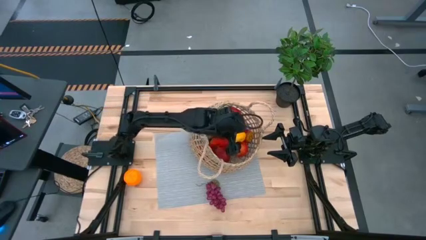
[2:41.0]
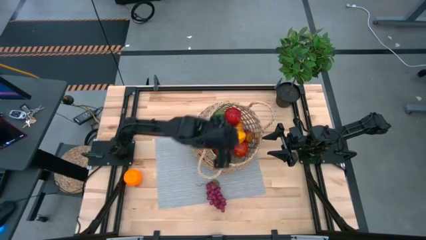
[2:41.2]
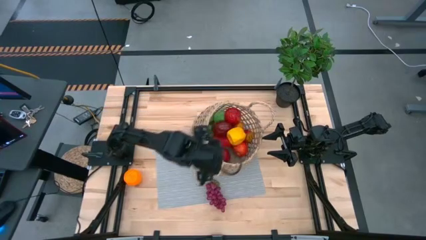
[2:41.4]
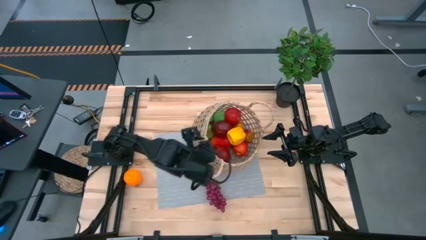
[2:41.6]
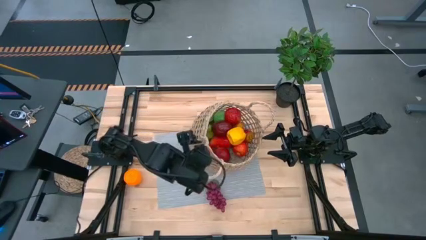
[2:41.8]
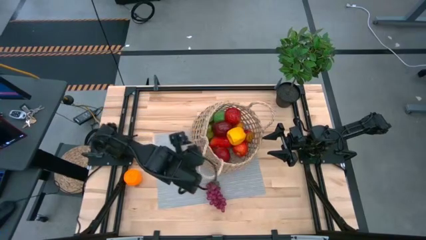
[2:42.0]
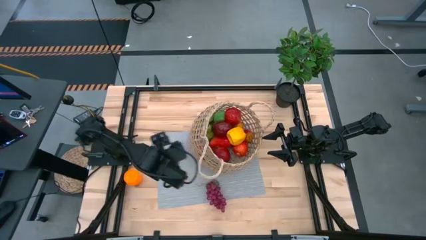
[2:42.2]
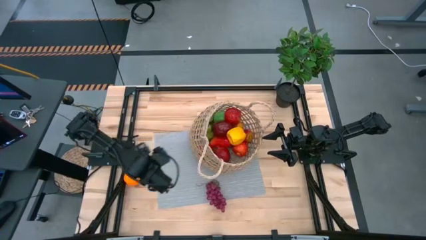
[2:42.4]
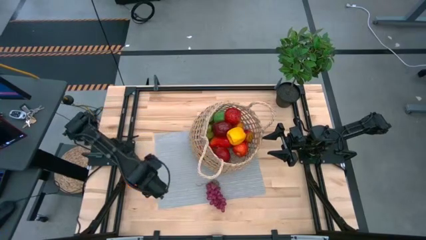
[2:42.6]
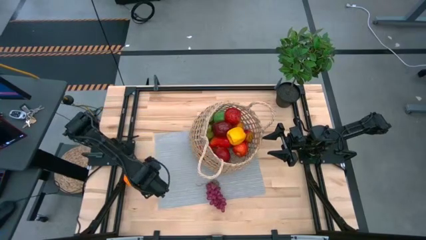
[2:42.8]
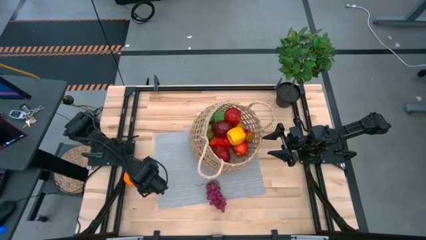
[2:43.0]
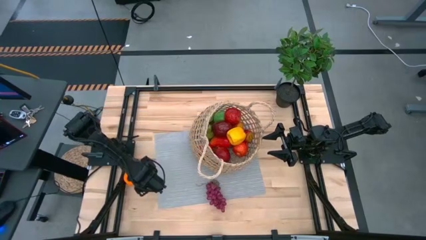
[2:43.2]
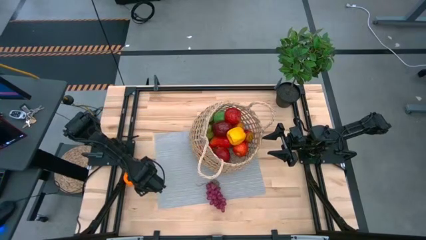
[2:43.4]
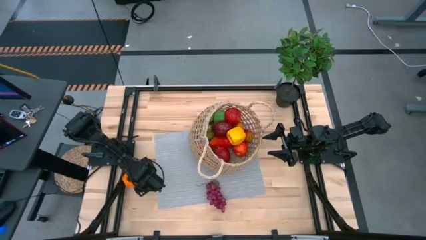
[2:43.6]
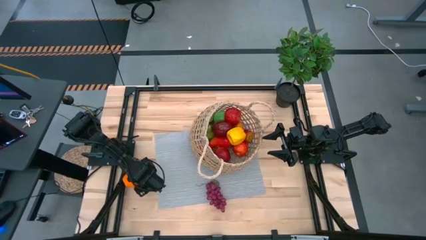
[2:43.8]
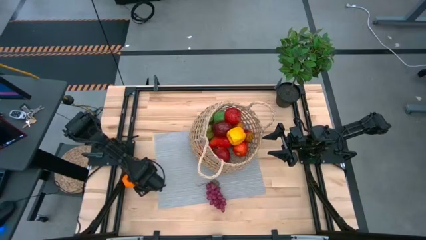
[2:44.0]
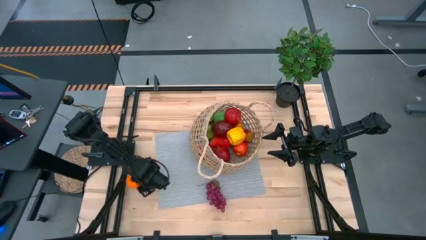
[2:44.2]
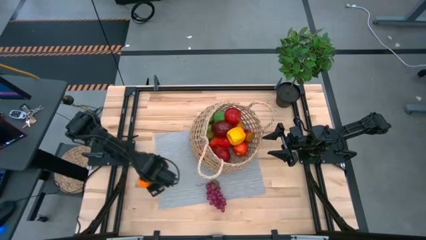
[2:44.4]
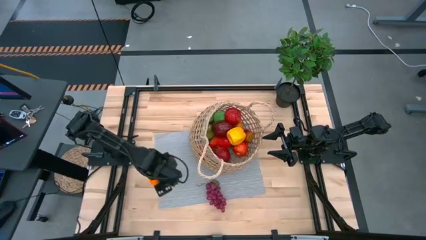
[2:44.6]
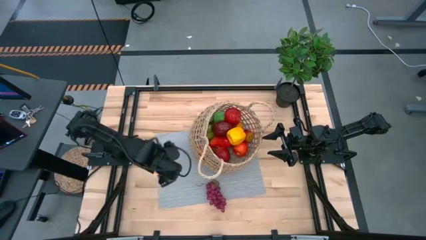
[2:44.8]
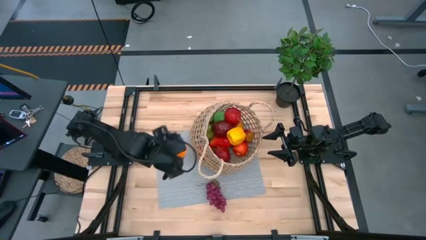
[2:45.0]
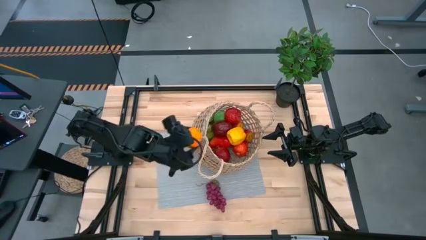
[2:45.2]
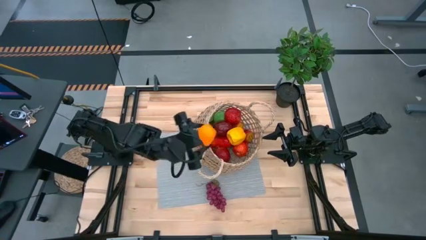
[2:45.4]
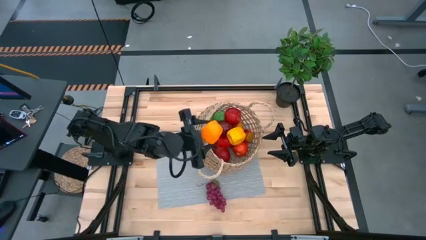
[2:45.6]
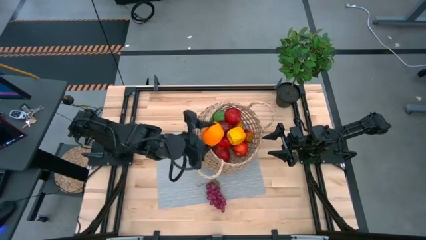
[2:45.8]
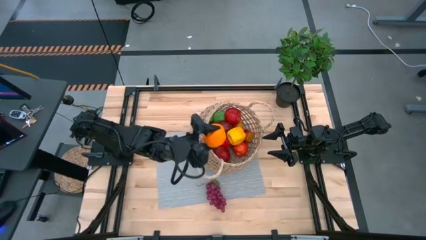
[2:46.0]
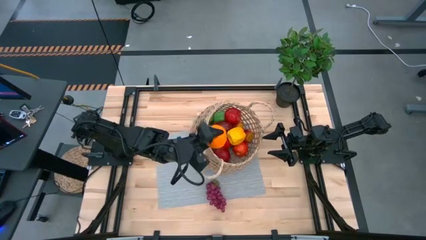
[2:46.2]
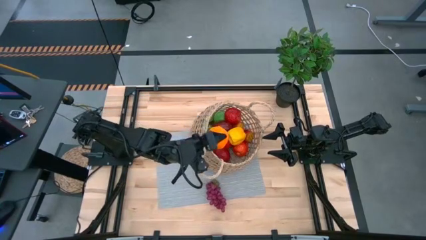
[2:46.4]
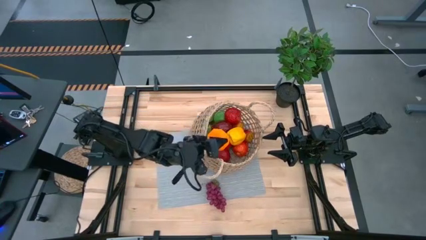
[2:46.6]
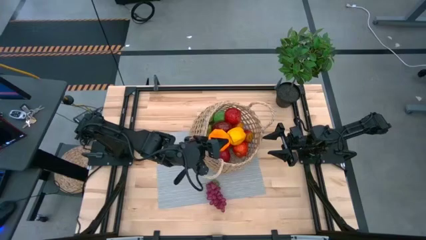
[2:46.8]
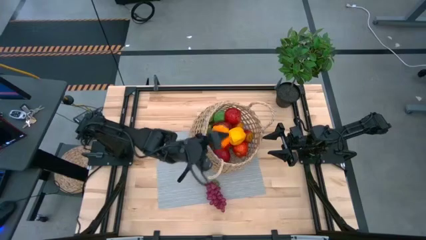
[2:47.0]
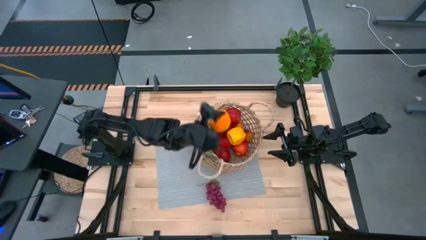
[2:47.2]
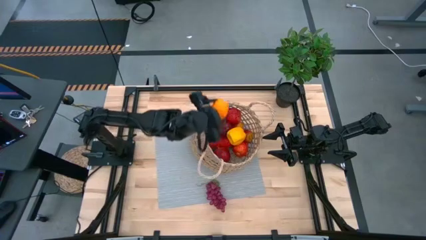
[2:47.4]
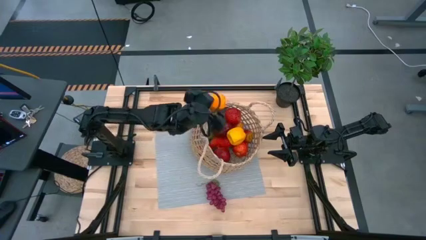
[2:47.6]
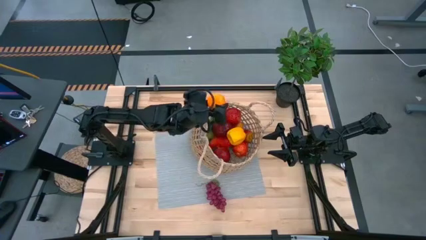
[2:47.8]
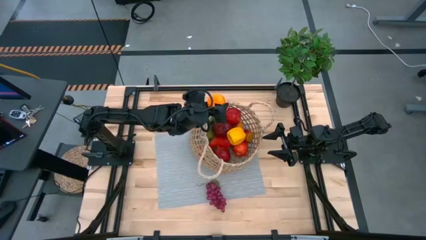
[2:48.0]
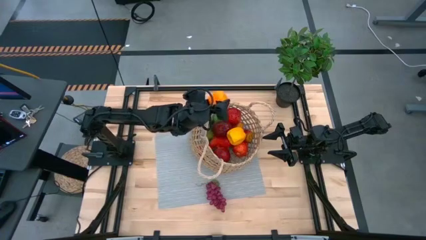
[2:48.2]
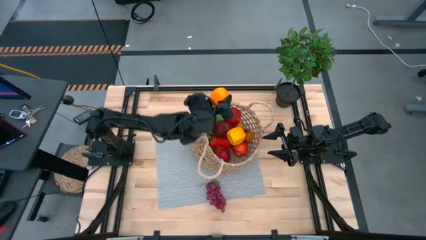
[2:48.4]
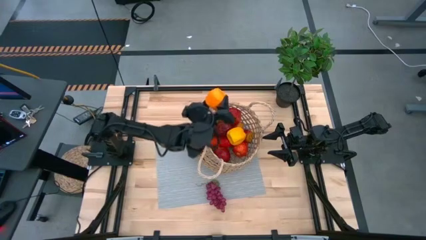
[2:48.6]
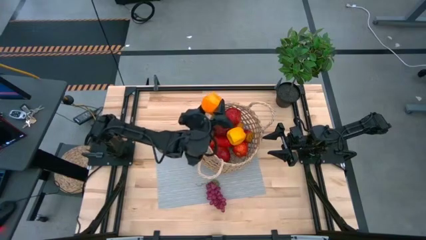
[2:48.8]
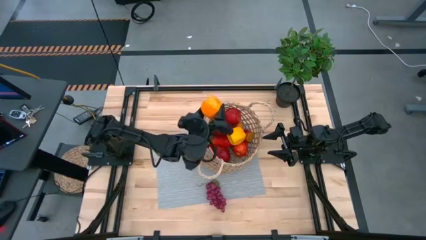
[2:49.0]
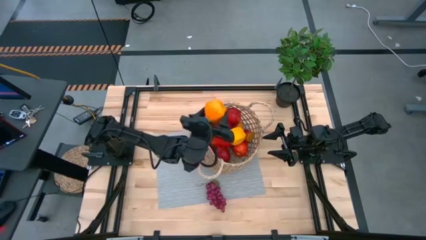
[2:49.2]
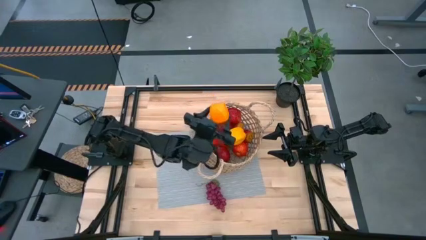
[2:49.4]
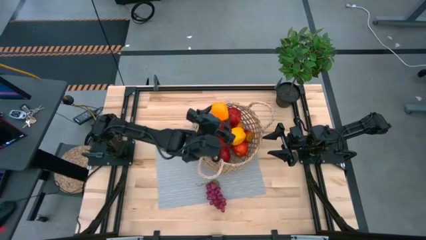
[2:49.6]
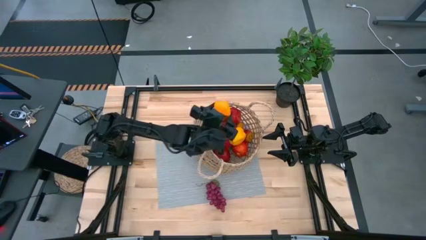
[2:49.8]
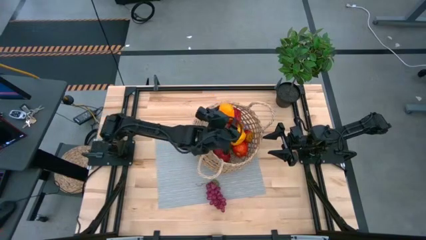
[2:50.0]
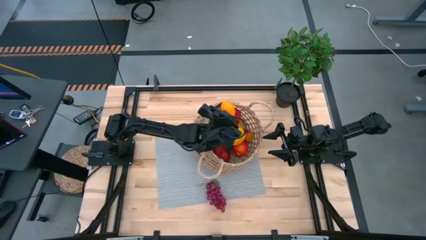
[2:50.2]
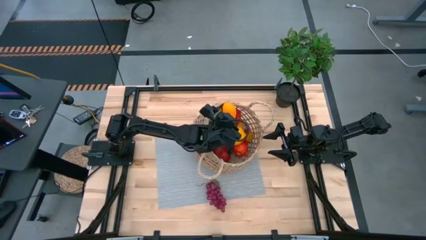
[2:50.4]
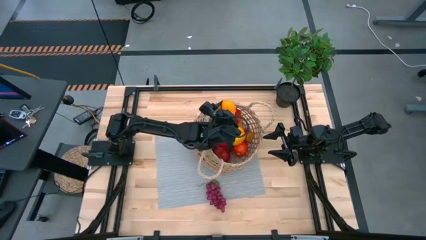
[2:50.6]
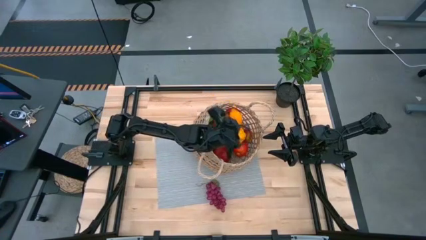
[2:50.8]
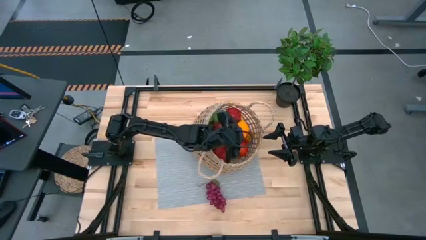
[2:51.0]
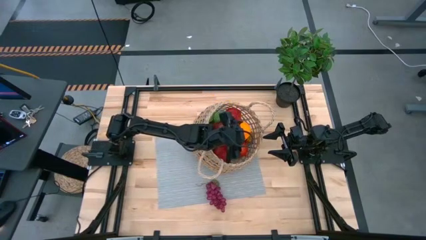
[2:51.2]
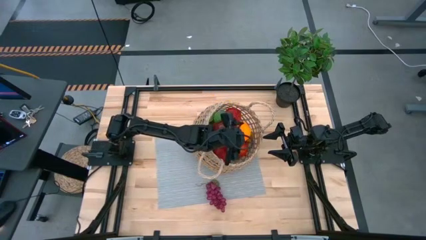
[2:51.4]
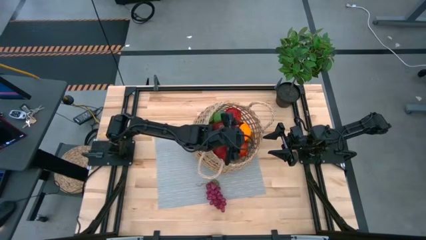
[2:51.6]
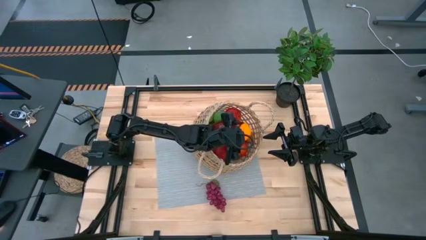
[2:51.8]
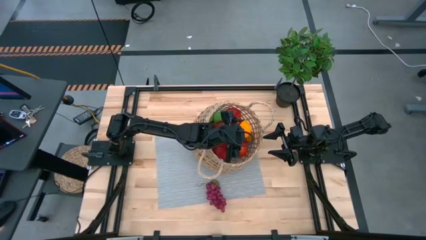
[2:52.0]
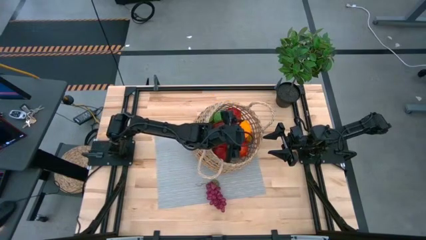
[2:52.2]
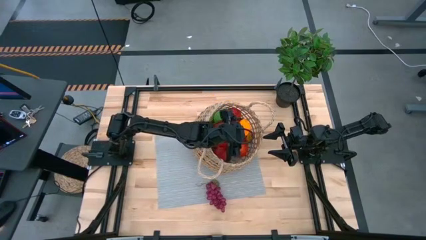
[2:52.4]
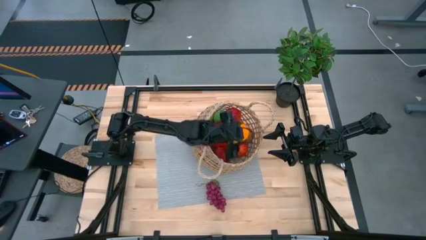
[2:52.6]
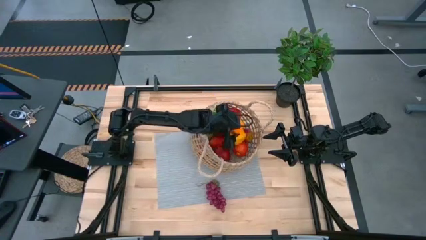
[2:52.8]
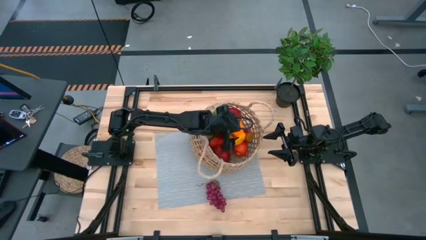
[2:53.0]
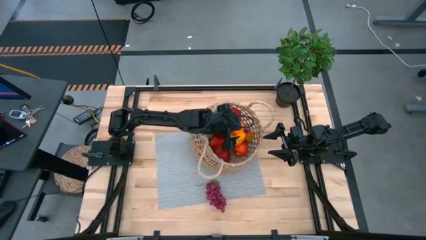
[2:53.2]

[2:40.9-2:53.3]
Task: Build produce basket
Put the orange into the brown basket

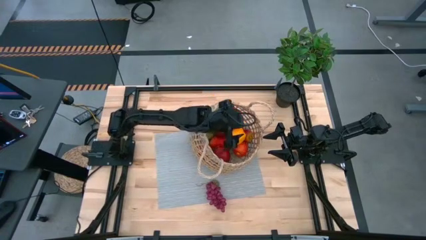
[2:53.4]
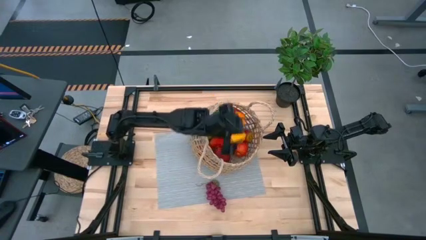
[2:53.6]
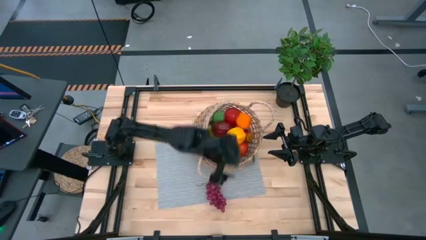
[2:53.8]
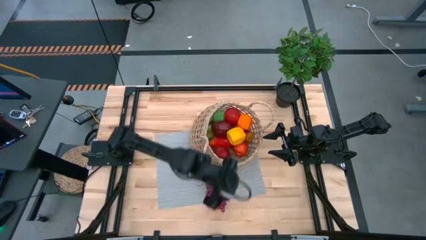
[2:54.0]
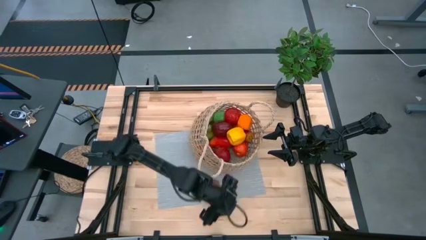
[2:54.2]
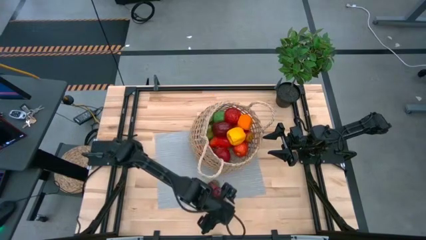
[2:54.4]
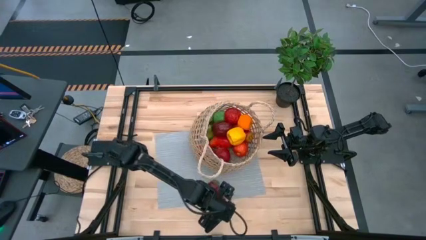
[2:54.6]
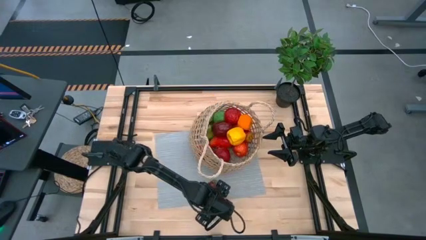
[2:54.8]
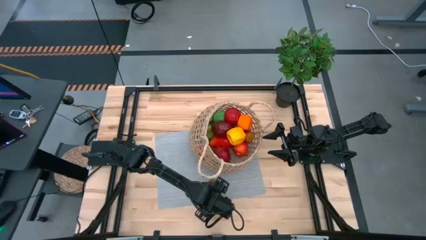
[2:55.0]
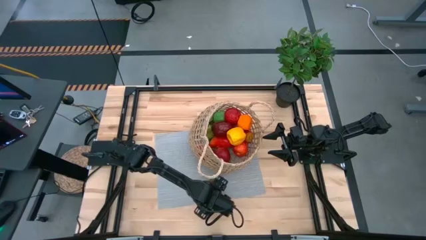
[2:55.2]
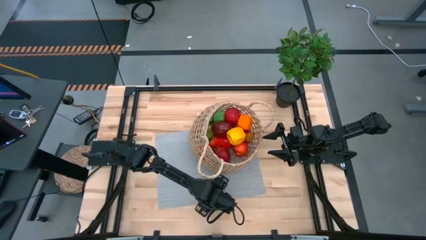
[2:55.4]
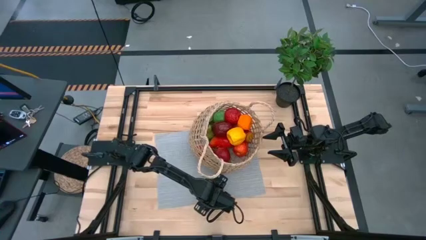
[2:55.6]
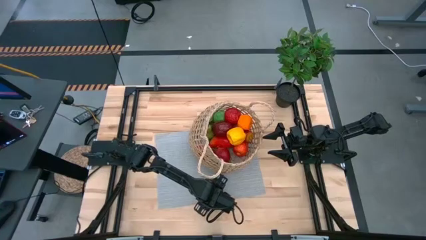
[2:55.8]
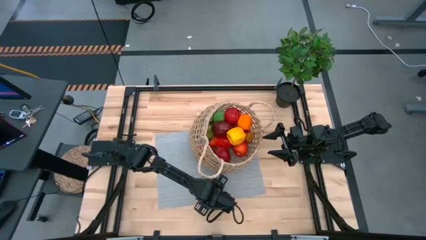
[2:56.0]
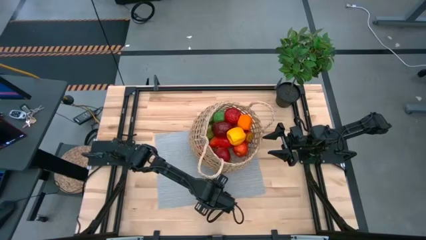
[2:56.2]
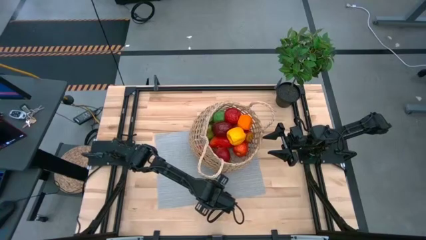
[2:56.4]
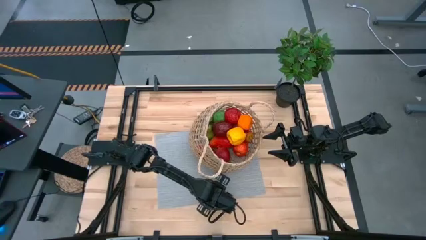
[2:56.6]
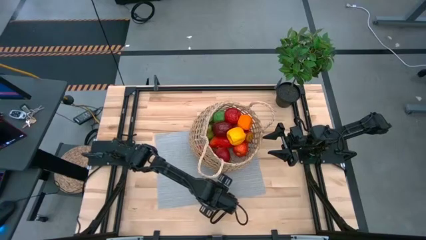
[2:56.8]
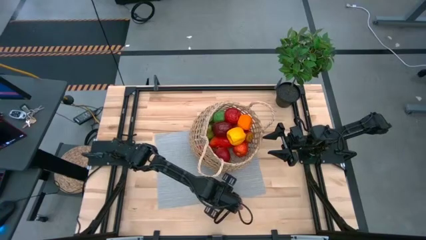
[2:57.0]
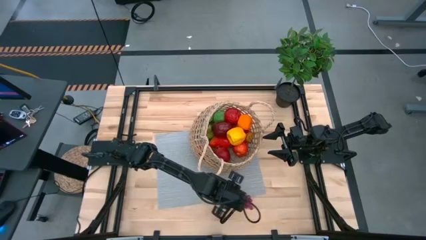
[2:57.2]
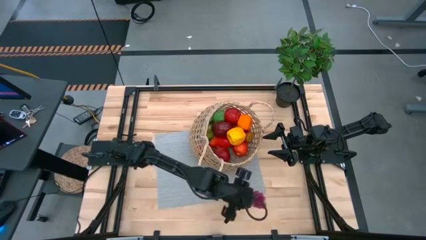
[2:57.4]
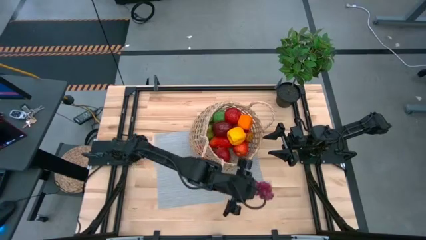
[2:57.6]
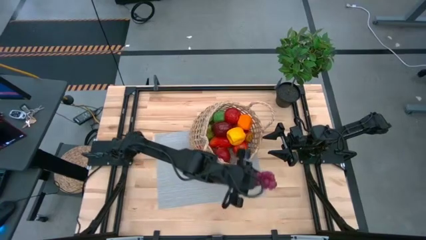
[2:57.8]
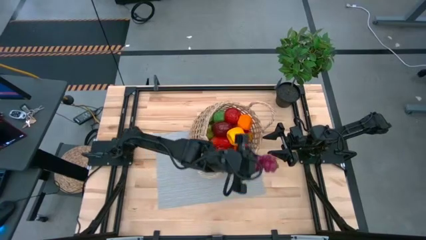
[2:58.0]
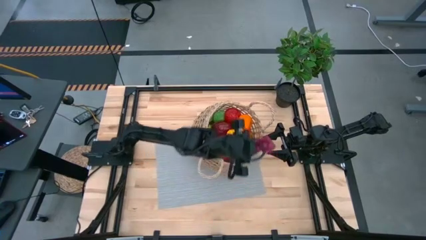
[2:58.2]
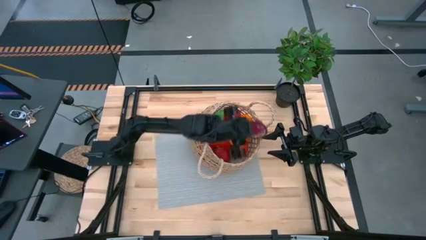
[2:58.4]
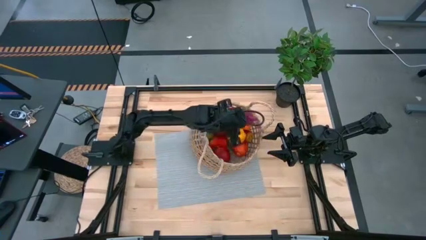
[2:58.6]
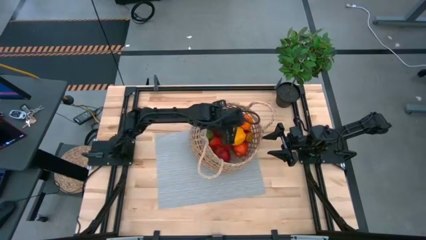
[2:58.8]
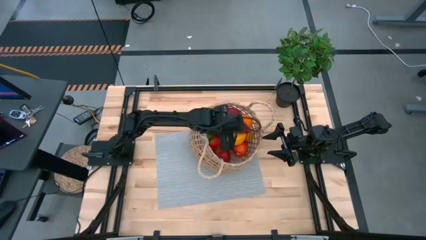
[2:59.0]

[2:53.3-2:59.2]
Put the grapes into the brown basket
